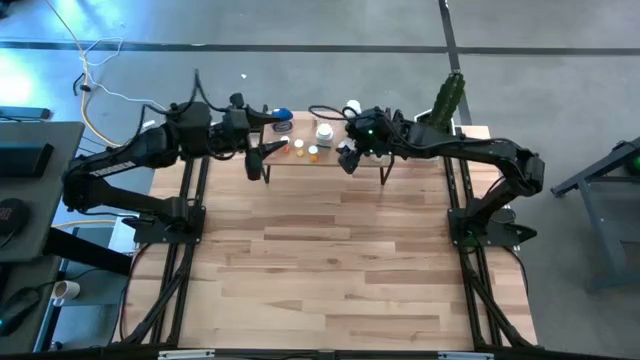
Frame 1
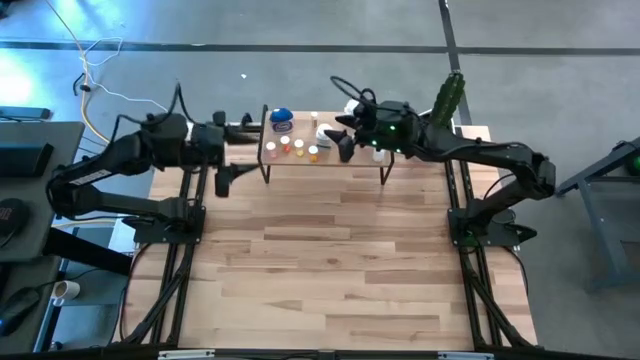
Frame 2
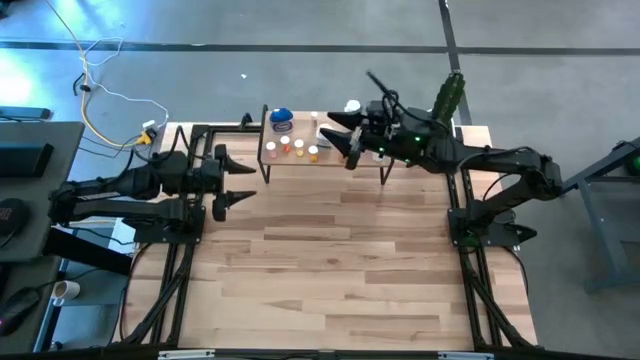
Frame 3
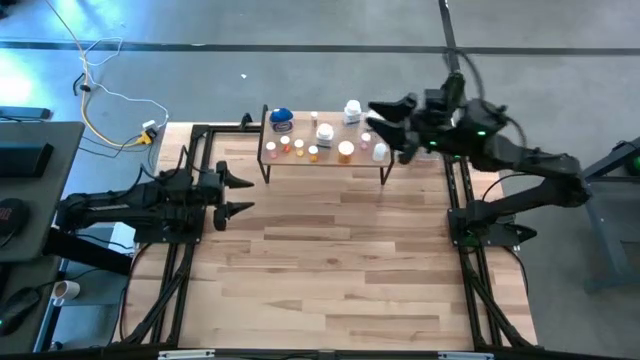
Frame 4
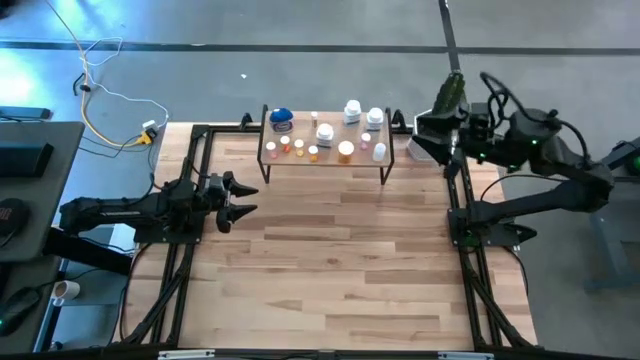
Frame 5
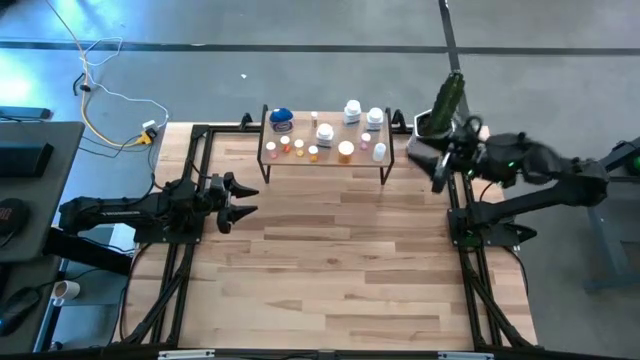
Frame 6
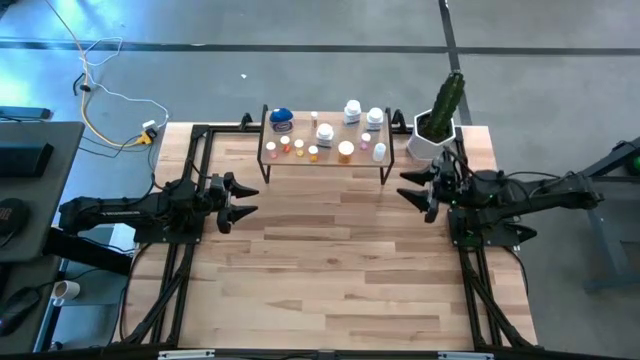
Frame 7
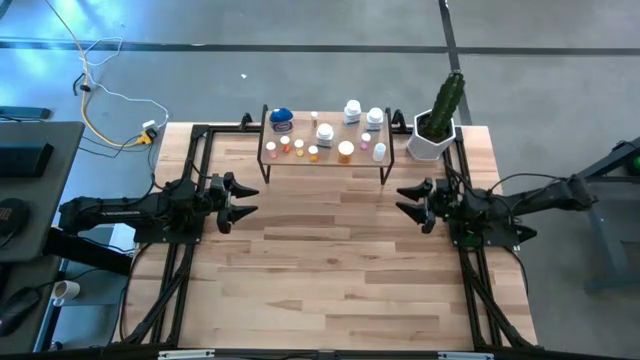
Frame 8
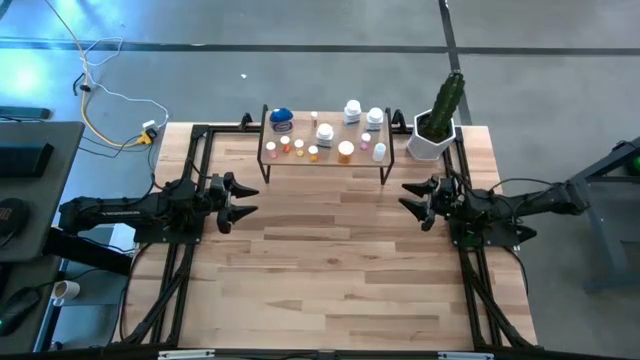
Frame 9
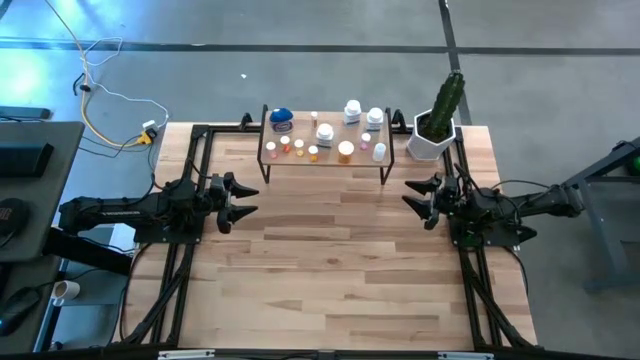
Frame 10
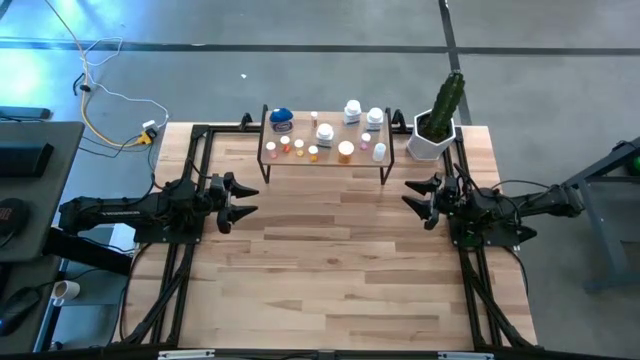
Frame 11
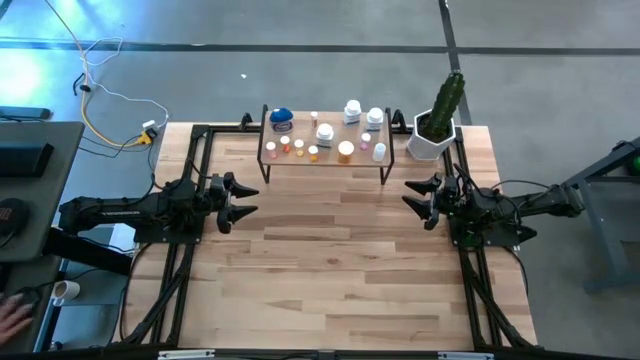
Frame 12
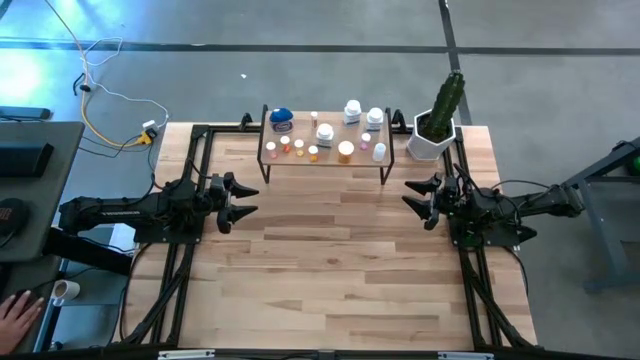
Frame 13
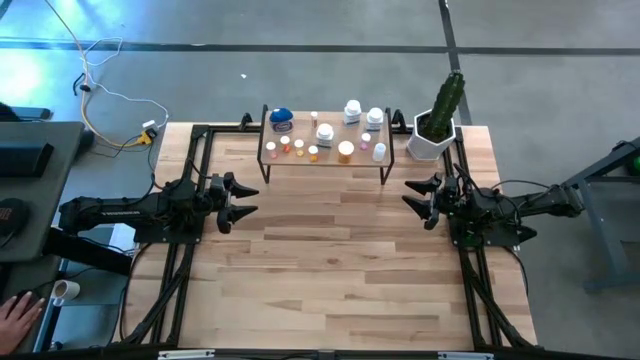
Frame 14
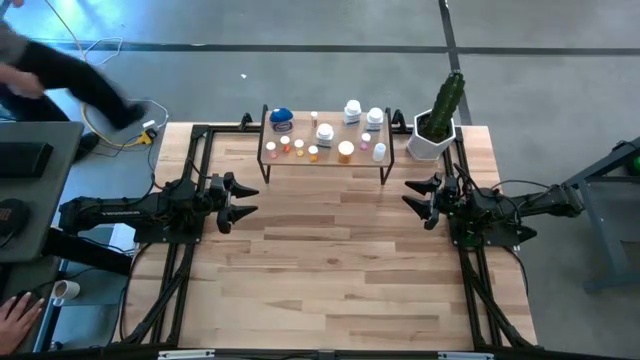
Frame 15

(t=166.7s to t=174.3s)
Task: Pick and place medicine bottles onto shelf by color
Return to Home Position

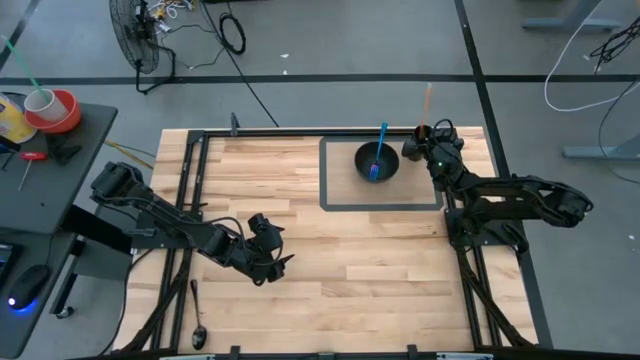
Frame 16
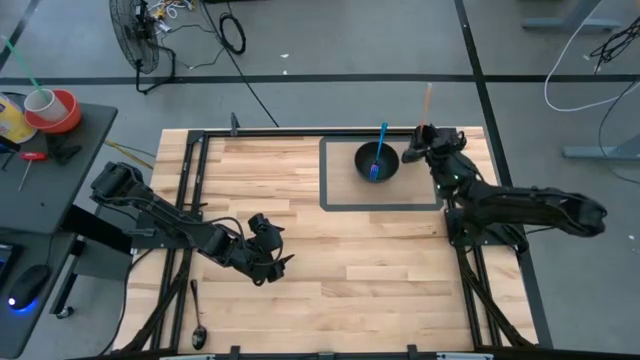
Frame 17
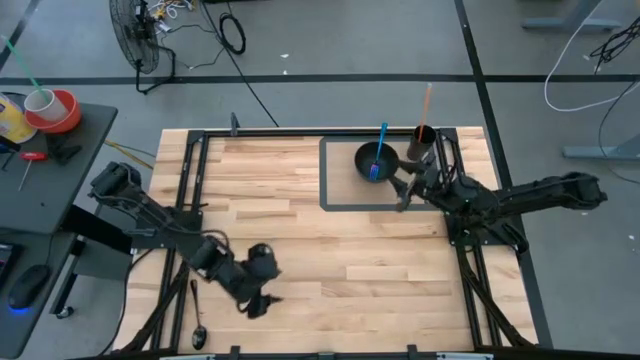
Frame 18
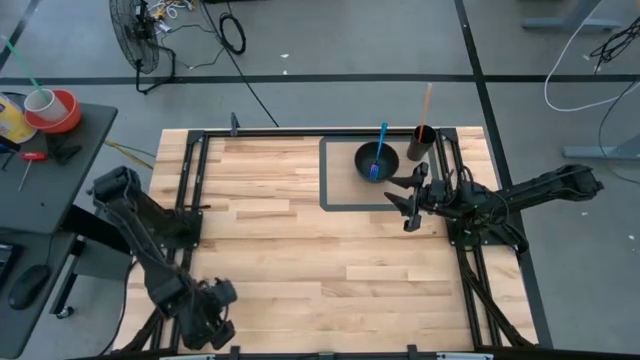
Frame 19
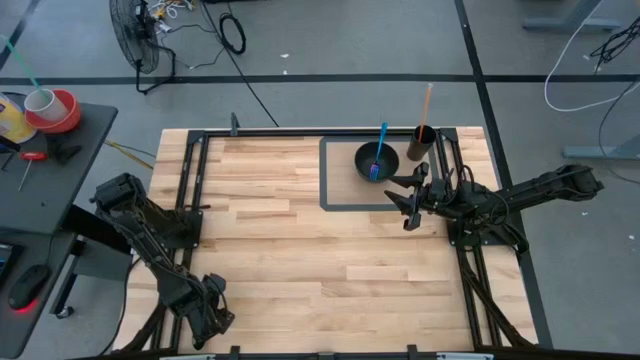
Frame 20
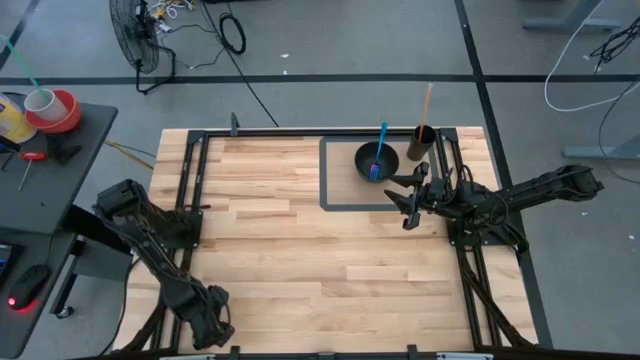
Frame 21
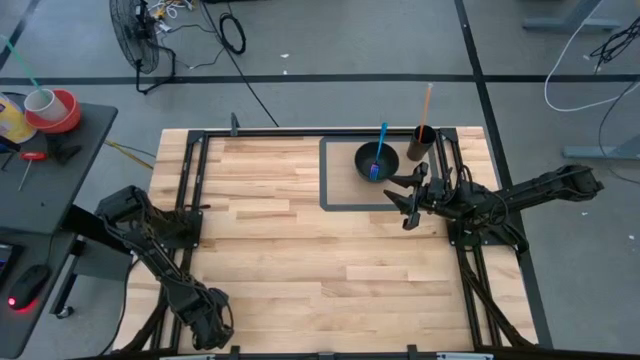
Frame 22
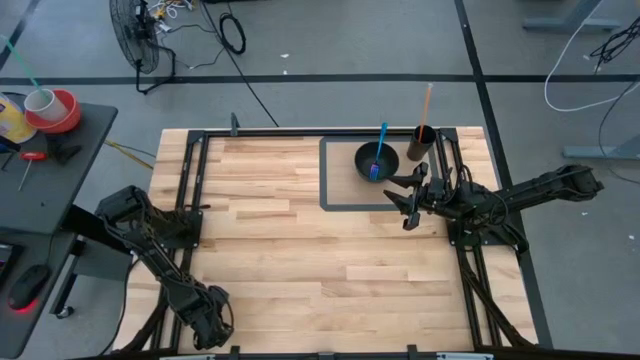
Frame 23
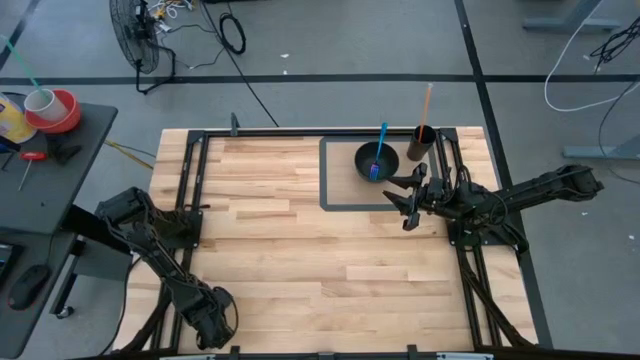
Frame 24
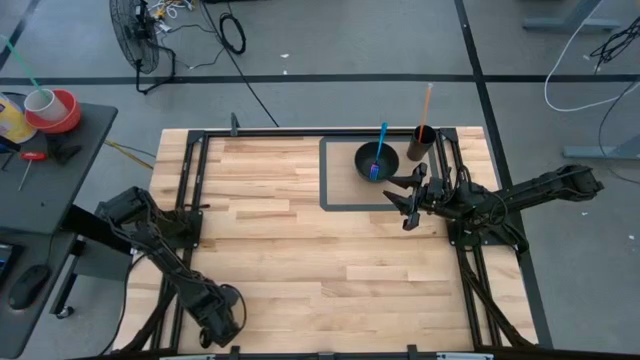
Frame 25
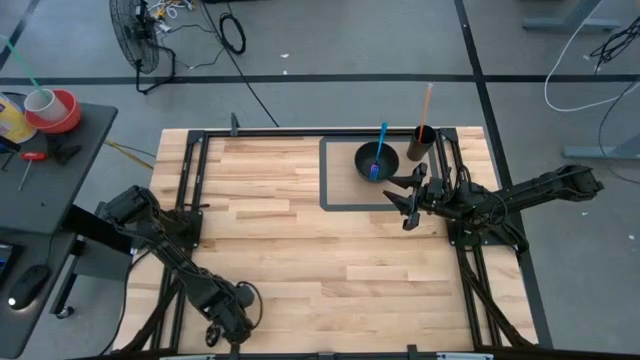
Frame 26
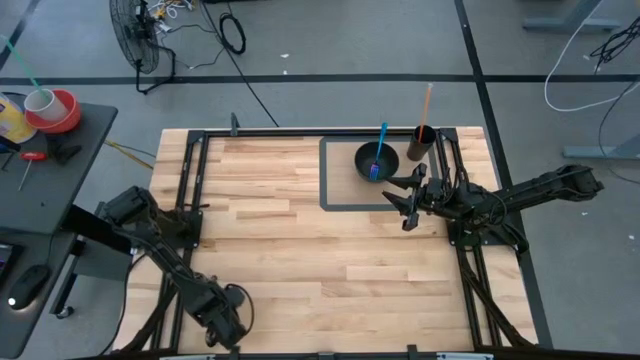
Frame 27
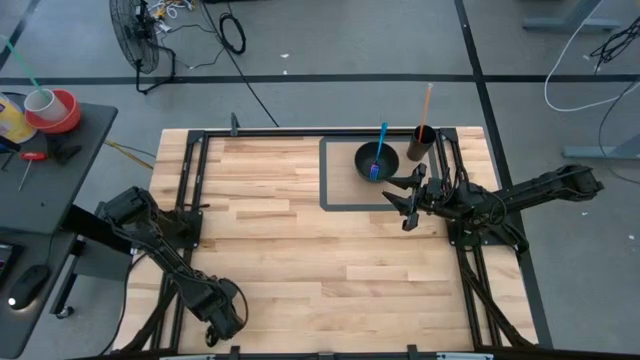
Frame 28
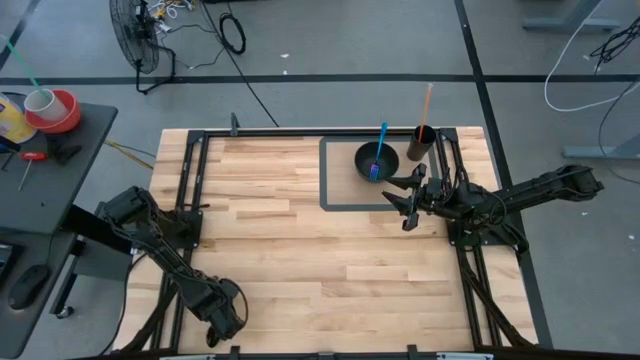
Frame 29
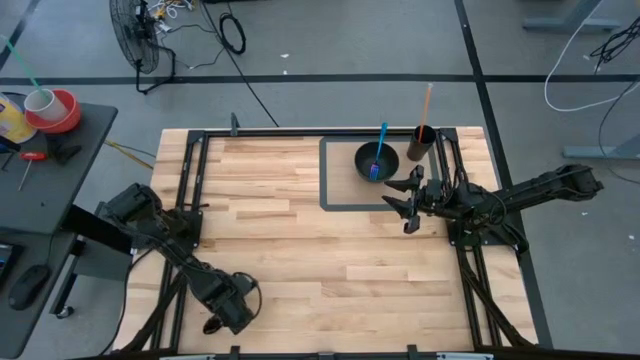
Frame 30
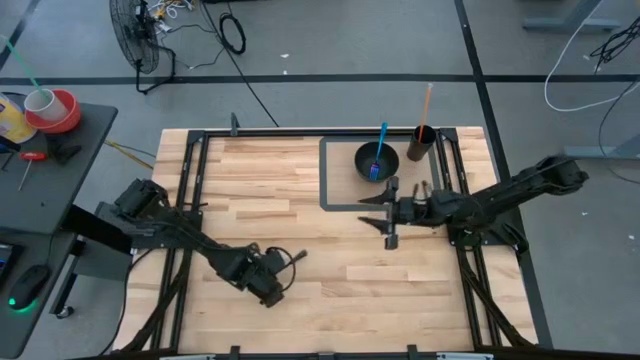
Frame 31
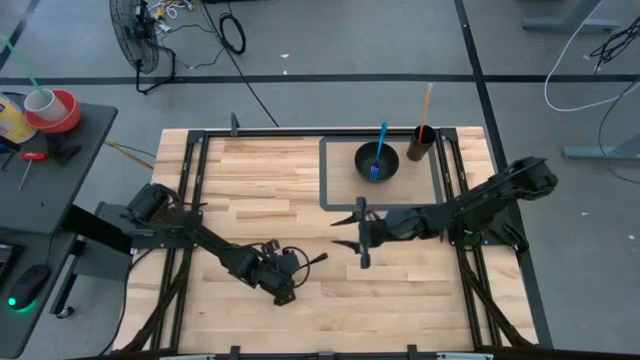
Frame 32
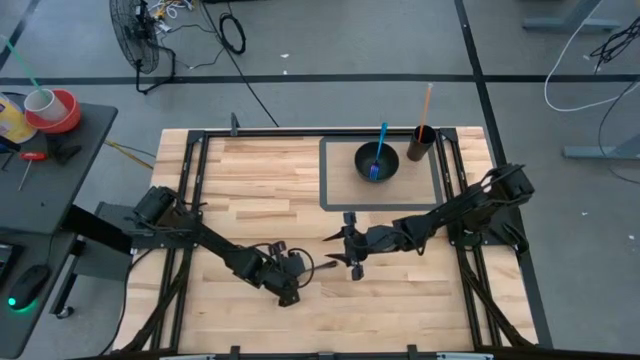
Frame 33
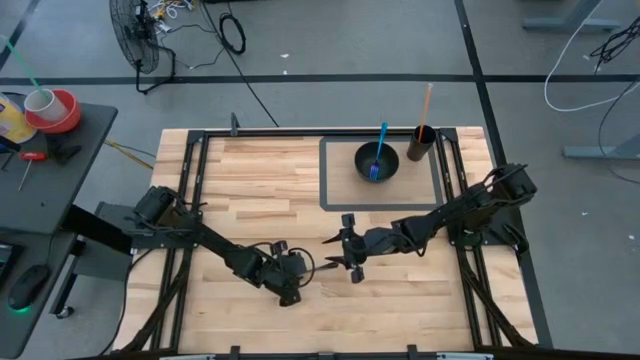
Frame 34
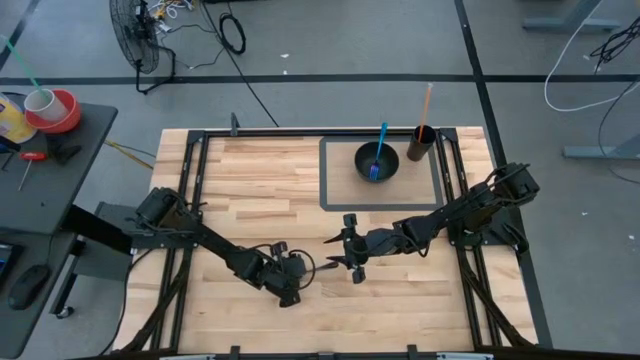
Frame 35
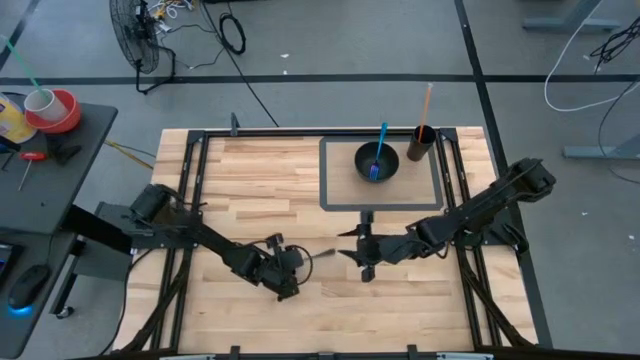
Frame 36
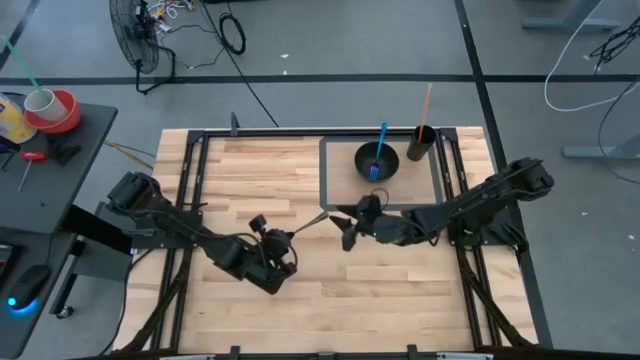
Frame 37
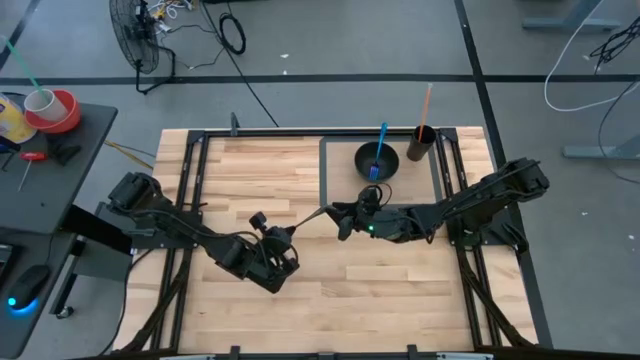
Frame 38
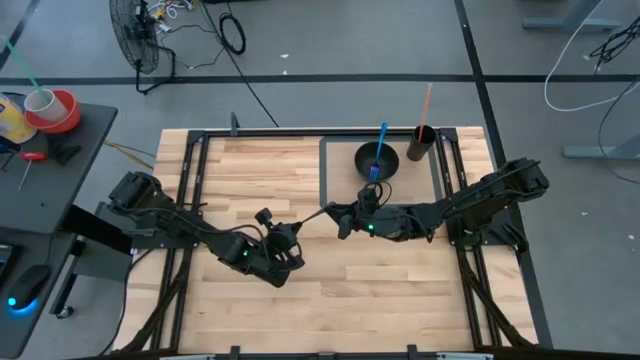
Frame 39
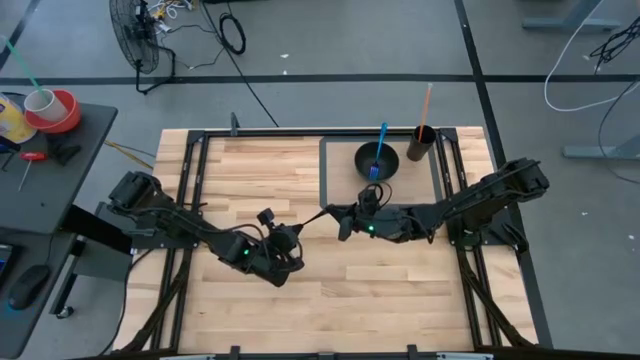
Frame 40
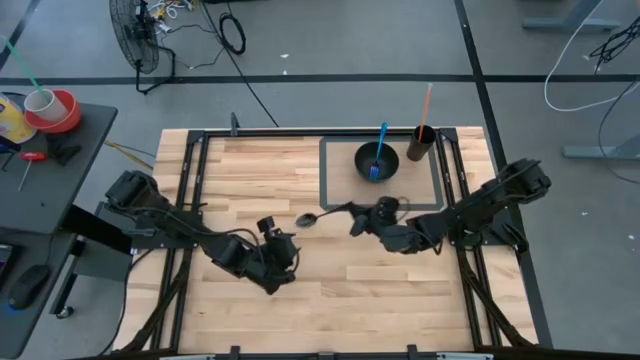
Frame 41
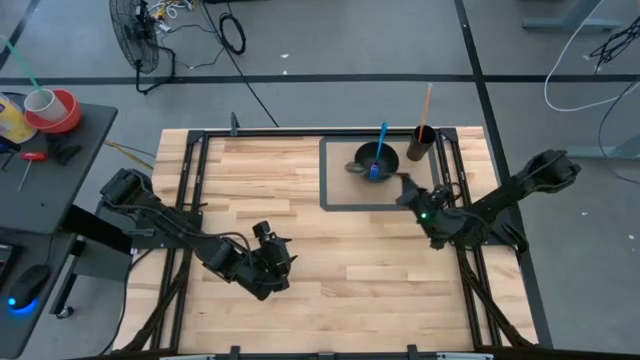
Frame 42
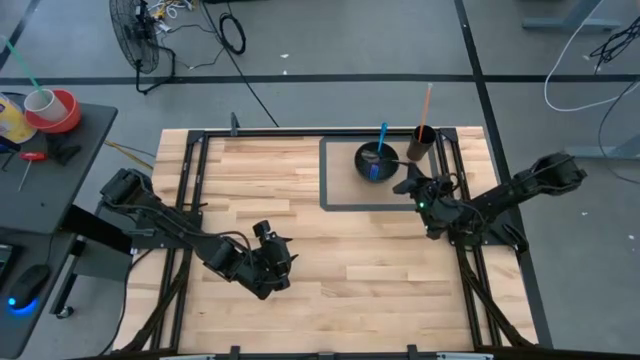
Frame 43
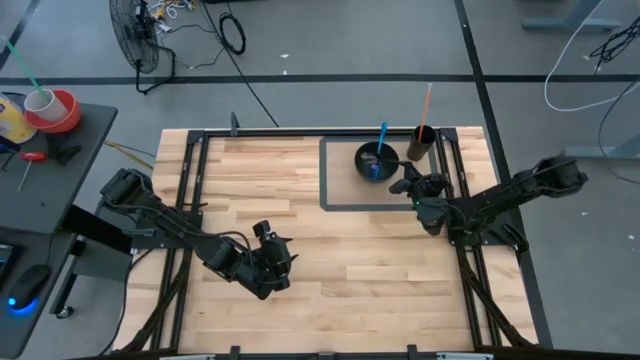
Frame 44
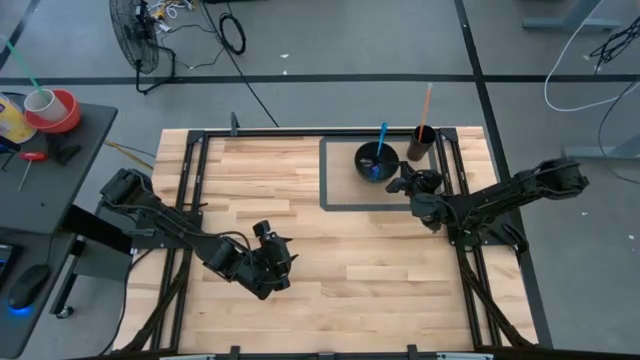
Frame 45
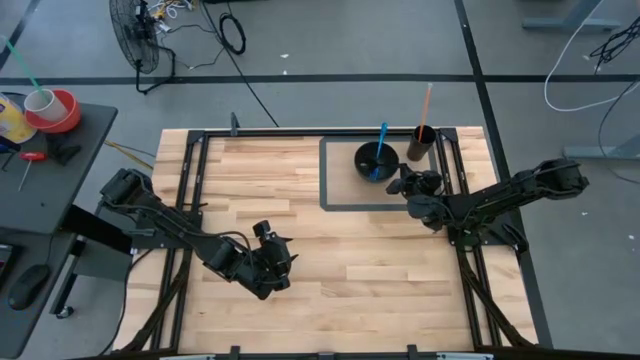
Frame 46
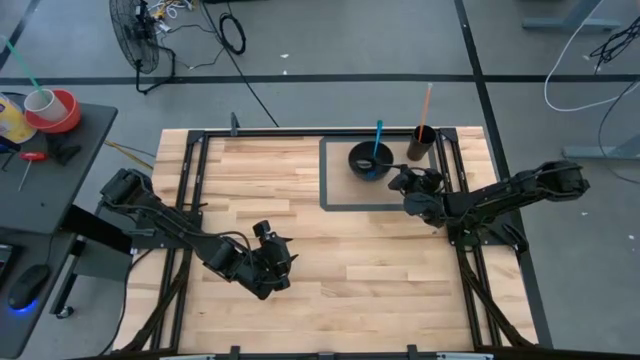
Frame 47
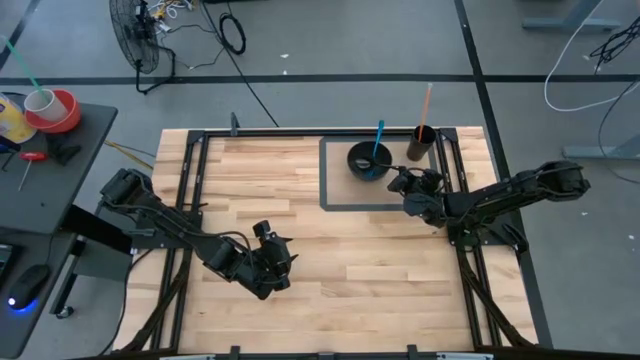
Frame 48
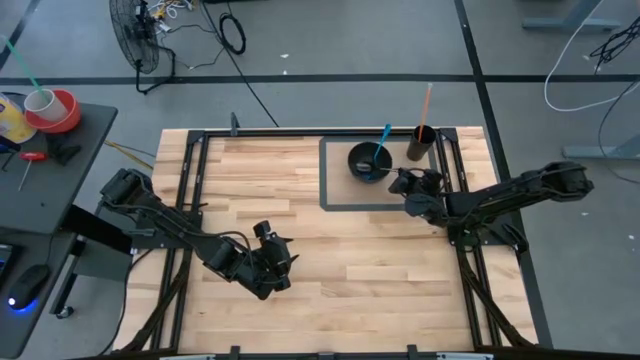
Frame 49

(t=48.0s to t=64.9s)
Task: Pick & Place Utensil
Put the black spoon into the black bowl on the brown mat
